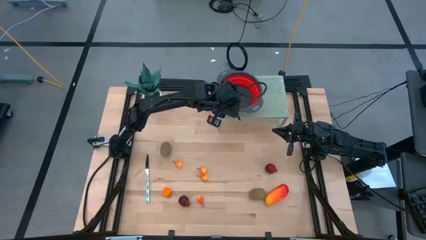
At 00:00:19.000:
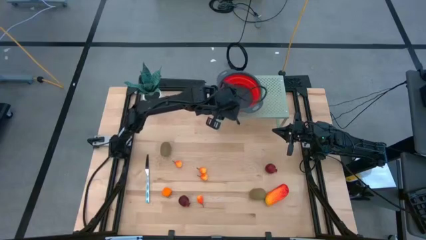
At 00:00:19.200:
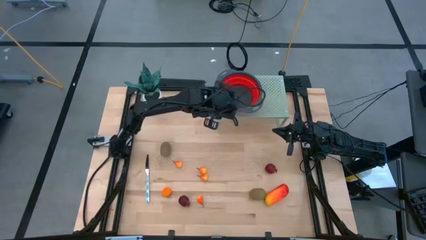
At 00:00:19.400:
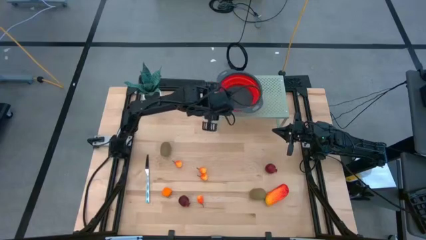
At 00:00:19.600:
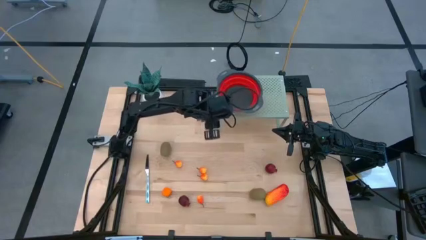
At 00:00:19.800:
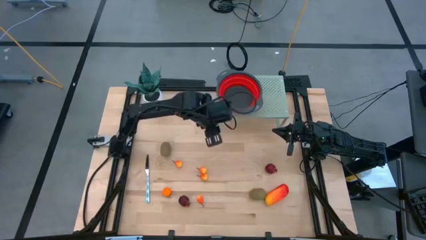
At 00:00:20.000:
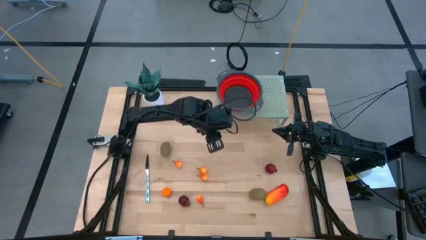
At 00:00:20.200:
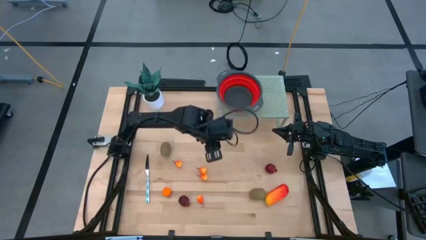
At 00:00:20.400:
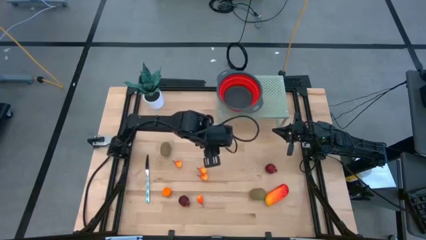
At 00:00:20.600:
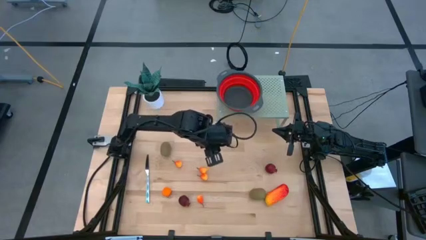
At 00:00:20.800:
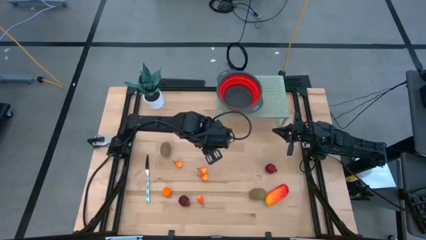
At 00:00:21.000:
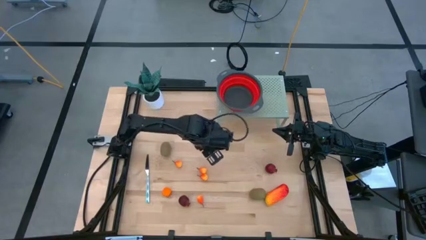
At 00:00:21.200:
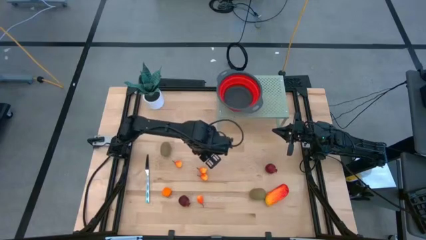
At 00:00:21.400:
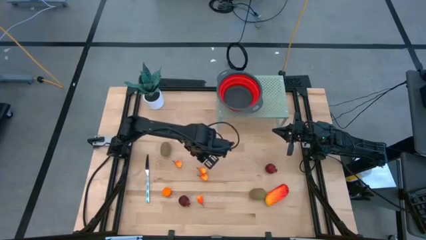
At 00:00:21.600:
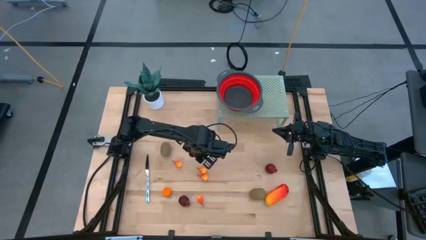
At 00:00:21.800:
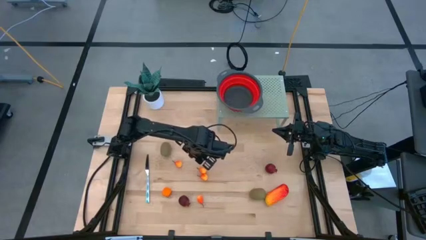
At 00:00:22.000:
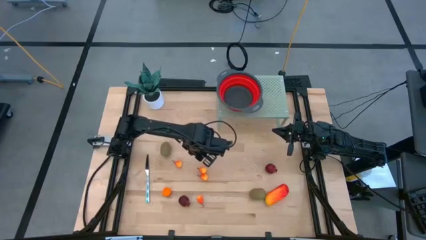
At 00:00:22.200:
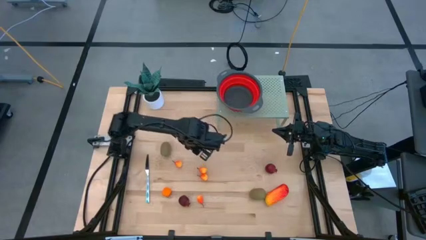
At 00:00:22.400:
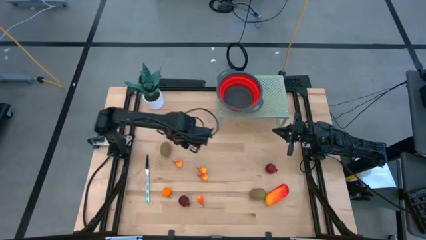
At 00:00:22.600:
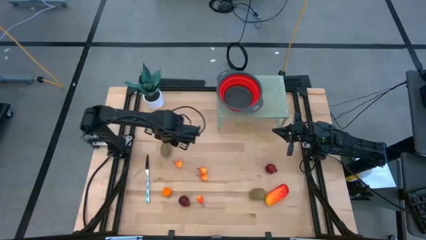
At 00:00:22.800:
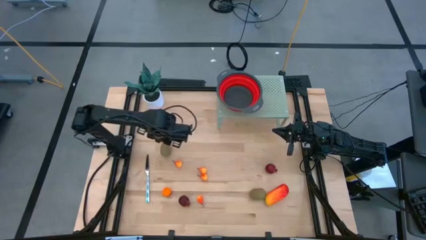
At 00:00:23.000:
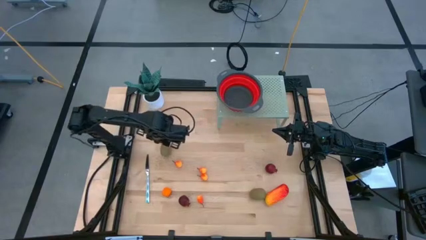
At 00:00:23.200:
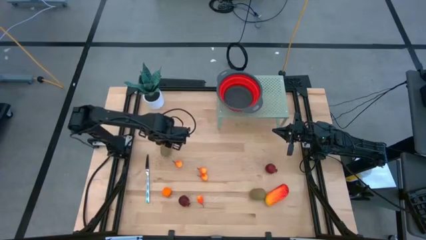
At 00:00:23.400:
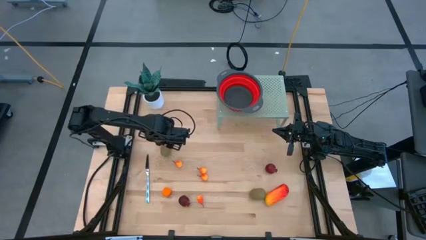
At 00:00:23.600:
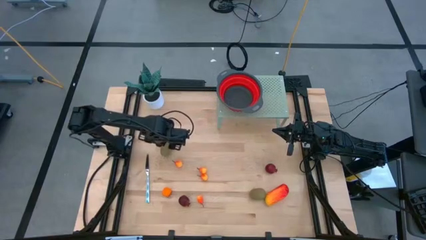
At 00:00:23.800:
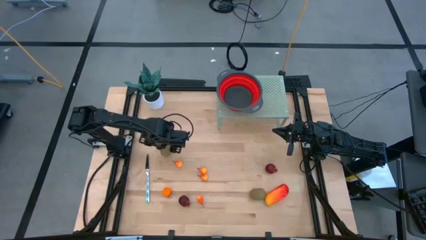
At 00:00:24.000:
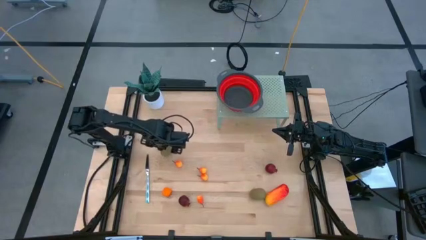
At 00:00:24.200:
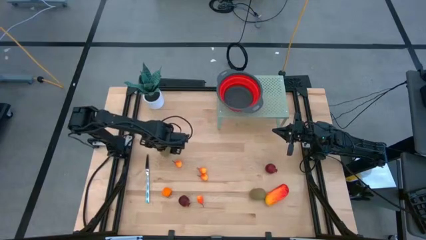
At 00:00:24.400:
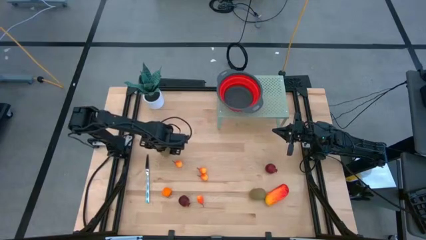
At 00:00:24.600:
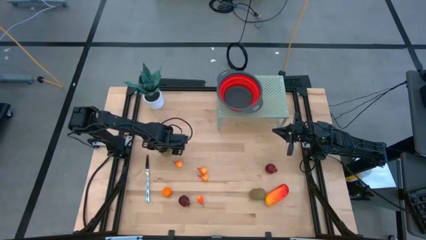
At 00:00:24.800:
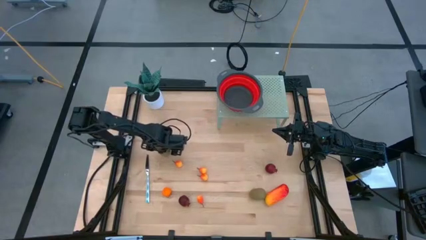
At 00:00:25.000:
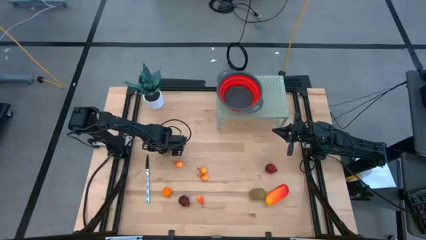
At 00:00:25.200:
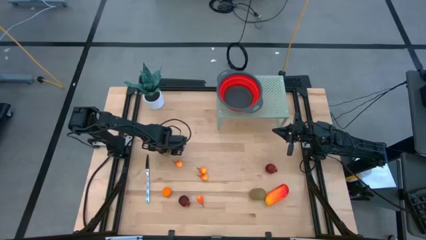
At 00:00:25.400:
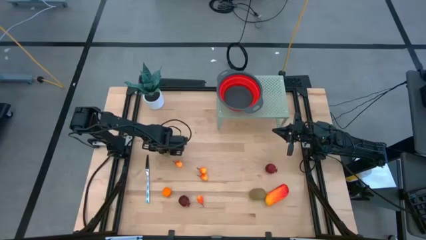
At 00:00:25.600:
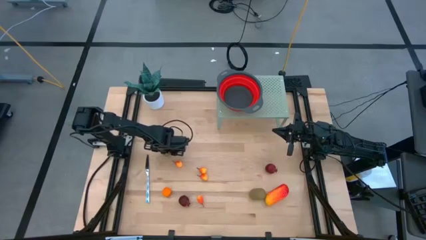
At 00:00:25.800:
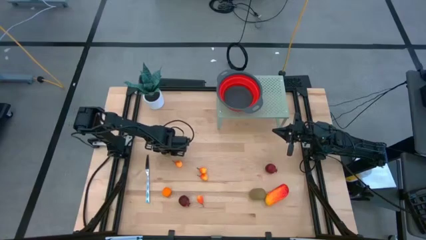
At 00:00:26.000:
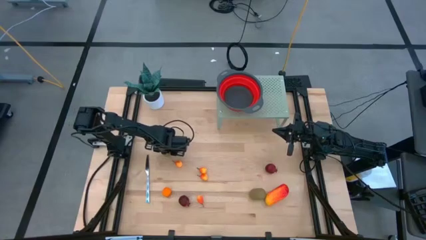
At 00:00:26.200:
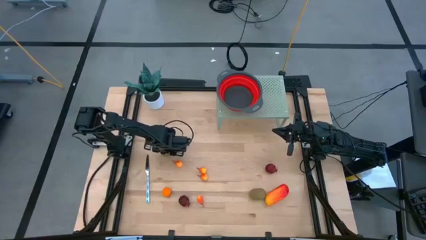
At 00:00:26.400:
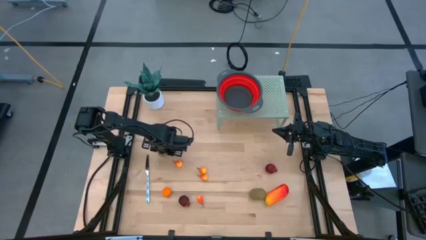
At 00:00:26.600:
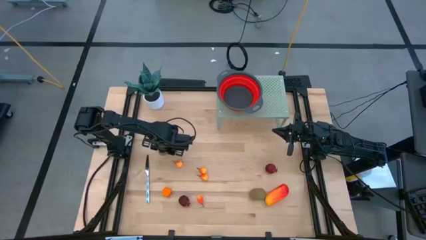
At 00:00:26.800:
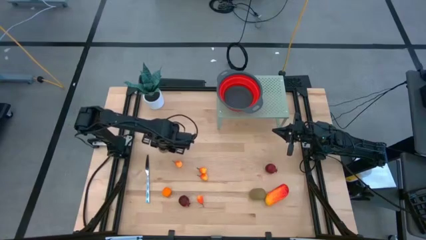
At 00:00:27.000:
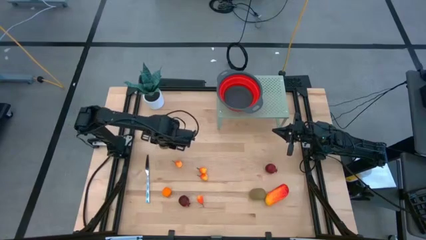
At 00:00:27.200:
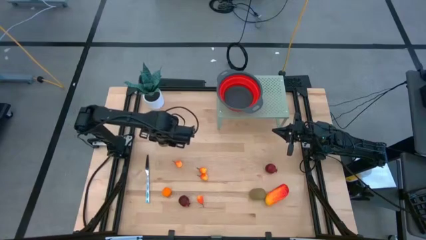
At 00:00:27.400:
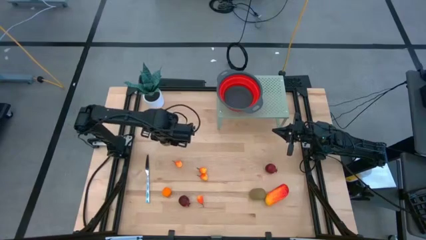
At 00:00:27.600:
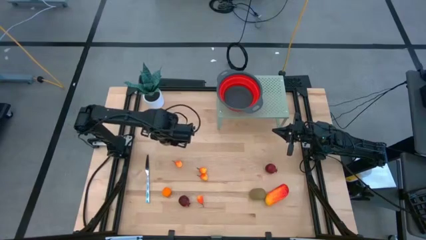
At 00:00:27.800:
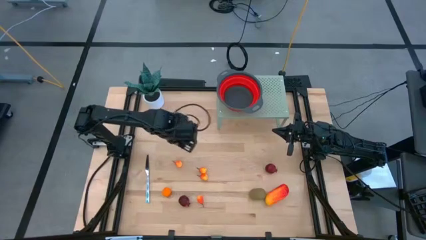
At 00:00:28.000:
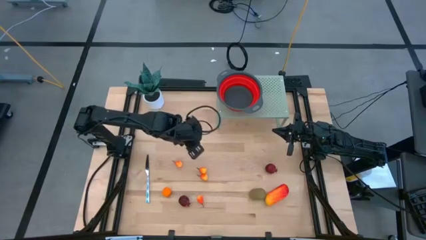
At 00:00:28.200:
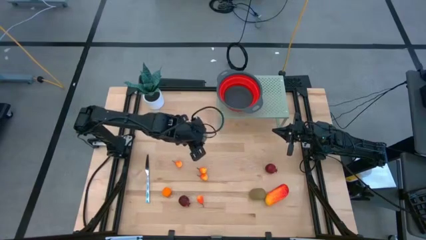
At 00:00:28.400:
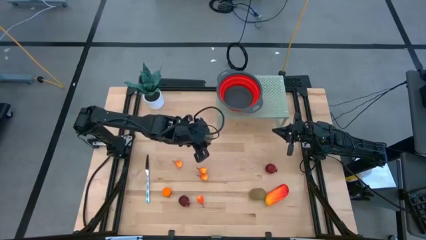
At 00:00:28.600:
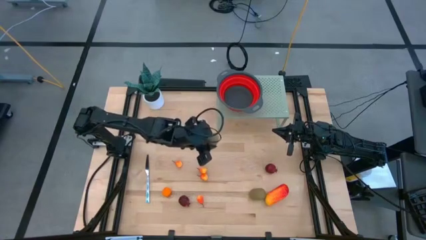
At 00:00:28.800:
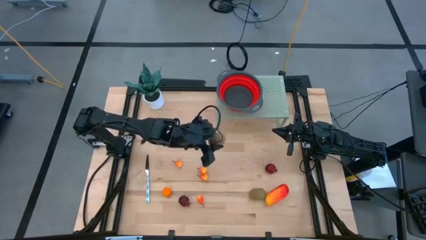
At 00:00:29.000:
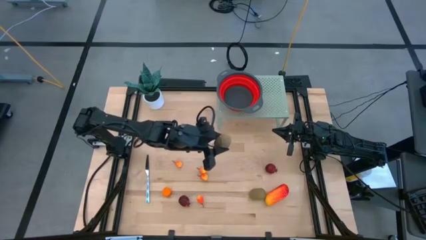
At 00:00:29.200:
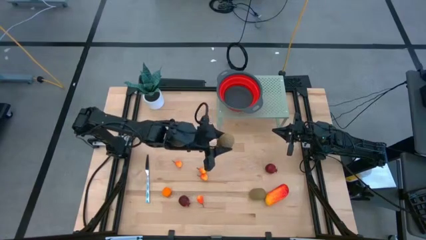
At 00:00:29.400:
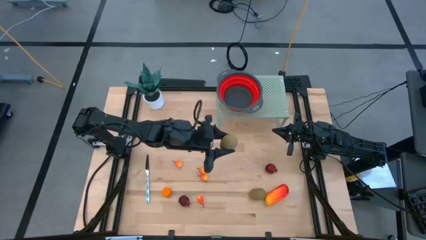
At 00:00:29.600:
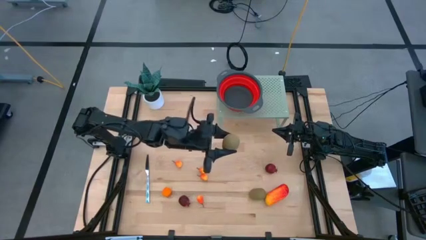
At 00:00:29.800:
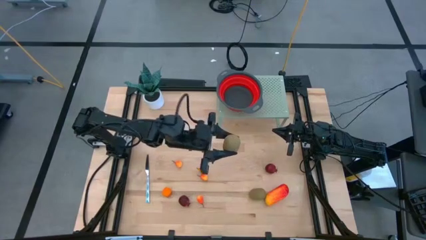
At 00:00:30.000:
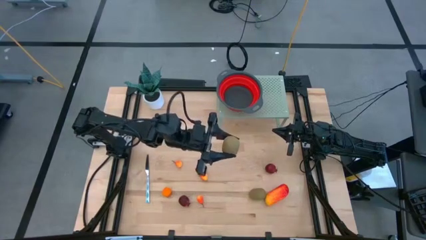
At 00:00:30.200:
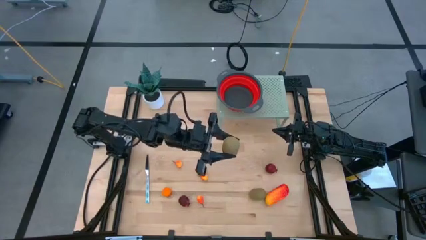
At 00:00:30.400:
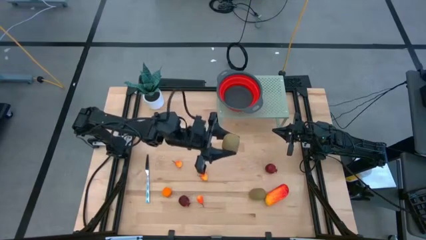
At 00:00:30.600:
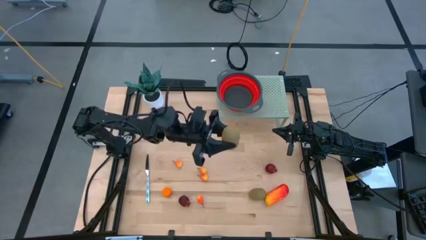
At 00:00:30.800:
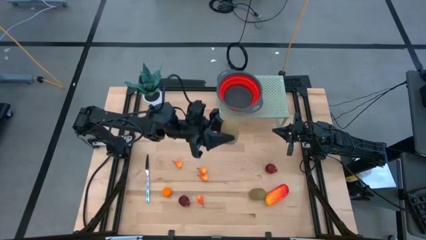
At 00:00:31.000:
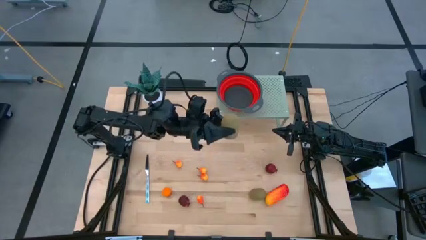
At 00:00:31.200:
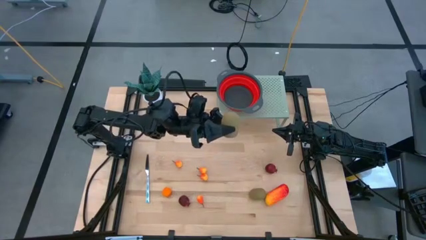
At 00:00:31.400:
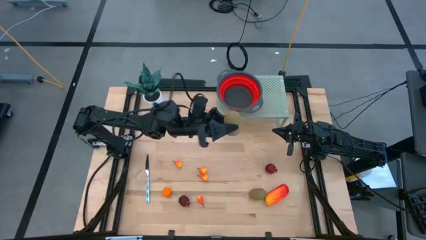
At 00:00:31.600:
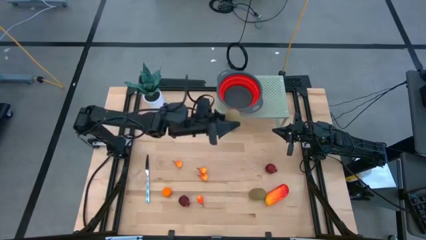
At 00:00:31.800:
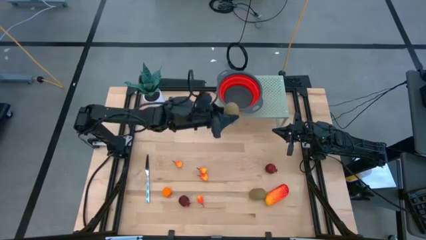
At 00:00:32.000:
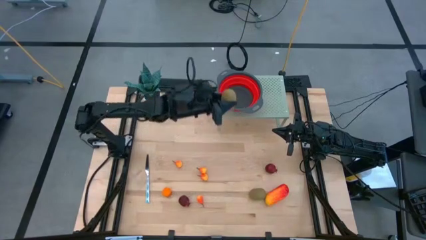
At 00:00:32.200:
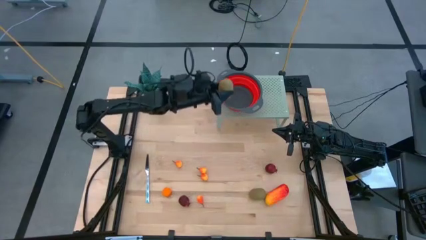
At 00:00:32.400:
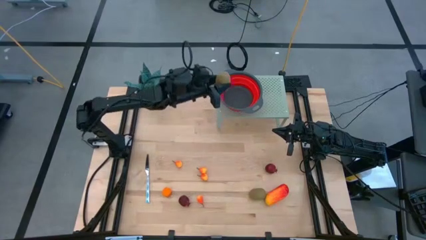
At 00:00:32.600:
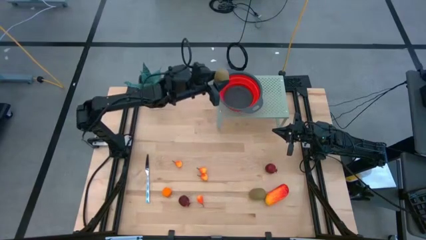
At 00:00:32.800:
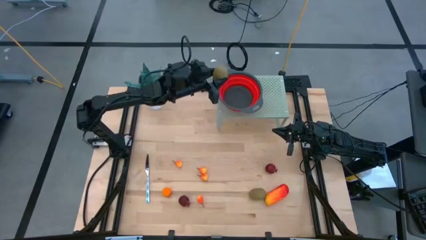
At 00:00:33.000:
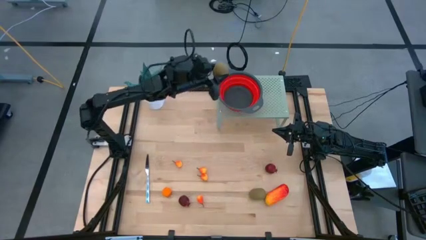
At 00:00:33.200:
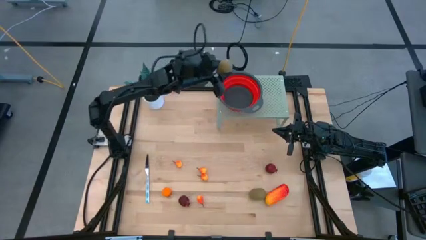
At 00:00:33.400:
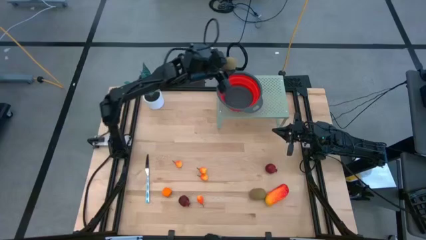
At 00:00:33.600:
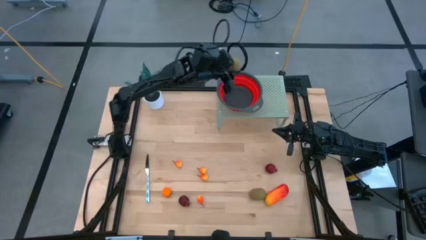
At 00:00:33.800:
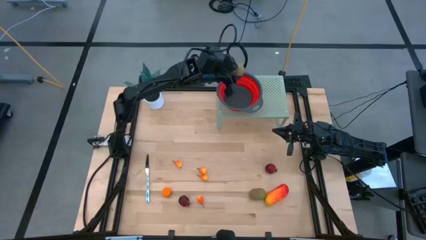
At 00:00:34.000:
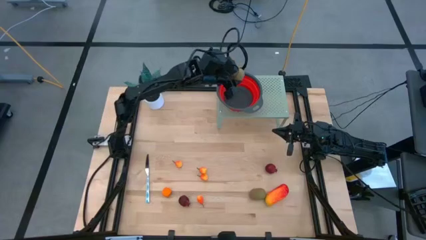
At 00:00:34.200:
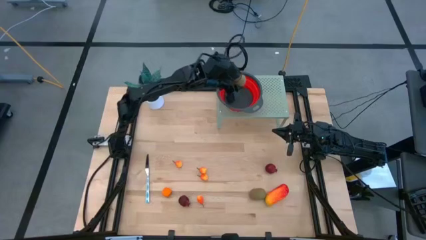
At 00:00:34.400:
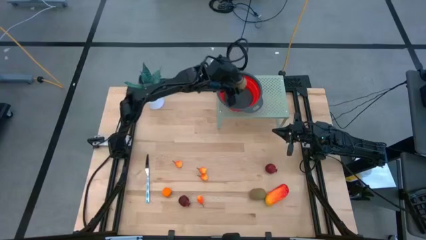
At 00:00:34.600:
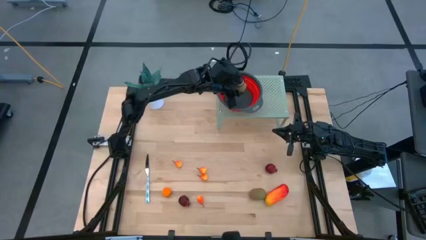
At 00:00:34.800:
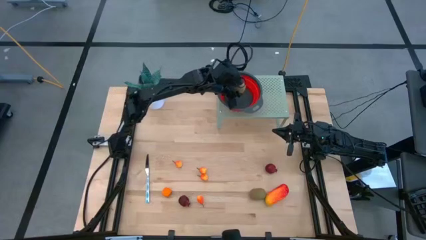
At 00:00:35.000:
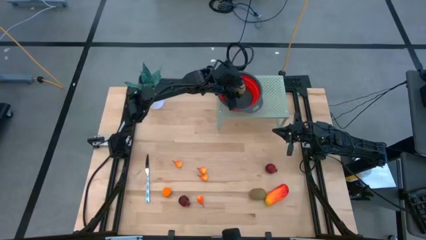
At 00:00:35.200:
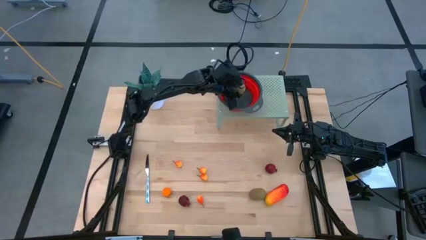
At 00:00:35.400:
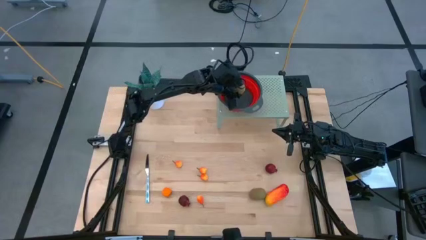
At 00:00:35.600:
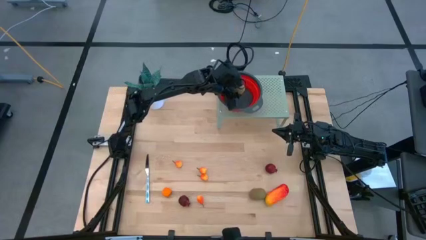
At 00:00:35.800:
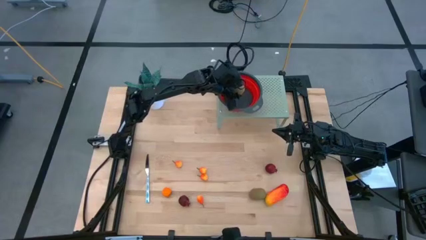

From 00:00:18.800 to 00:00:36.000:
Task: Pick & Place Fruit
Put the top brown kiwi into the red strainer bowl on the shelf
